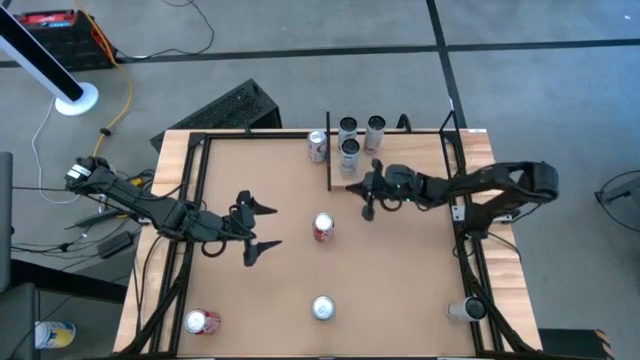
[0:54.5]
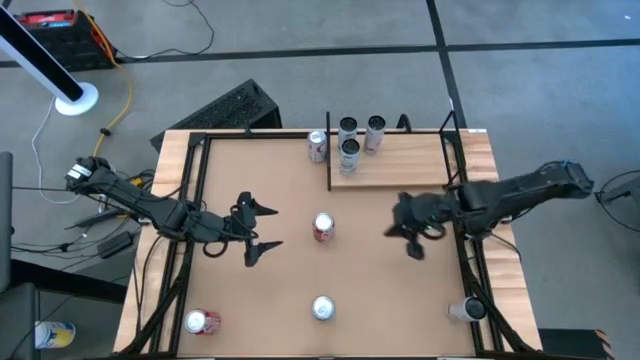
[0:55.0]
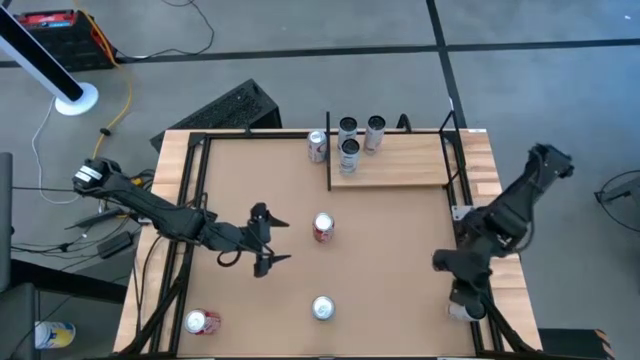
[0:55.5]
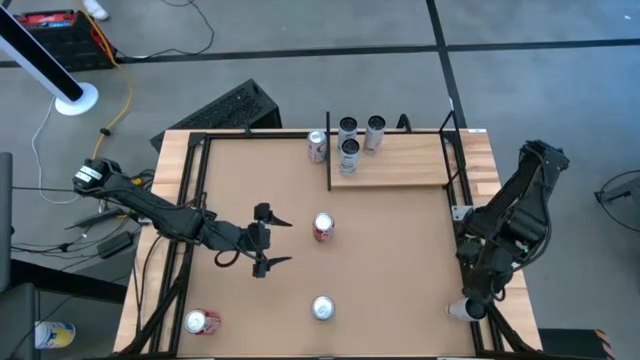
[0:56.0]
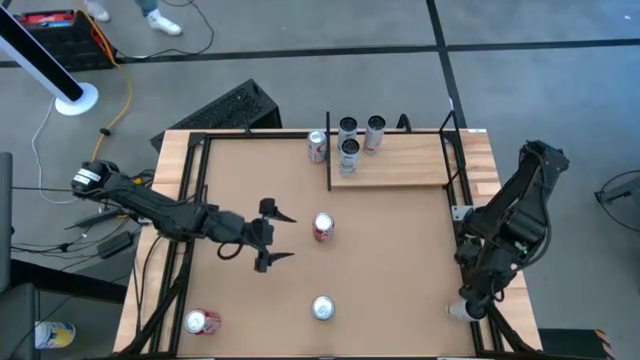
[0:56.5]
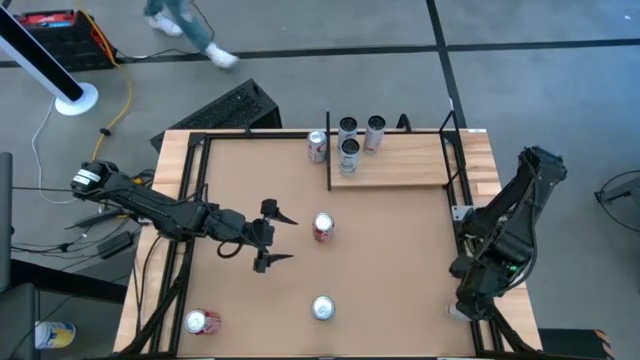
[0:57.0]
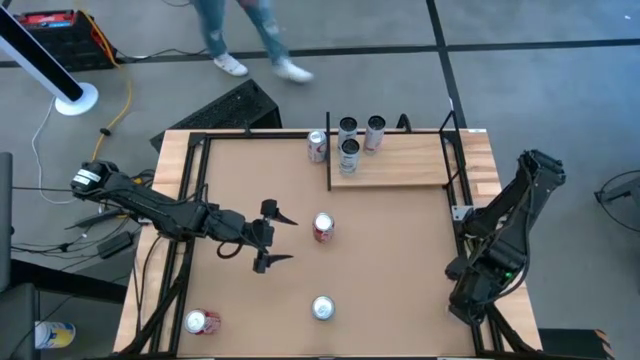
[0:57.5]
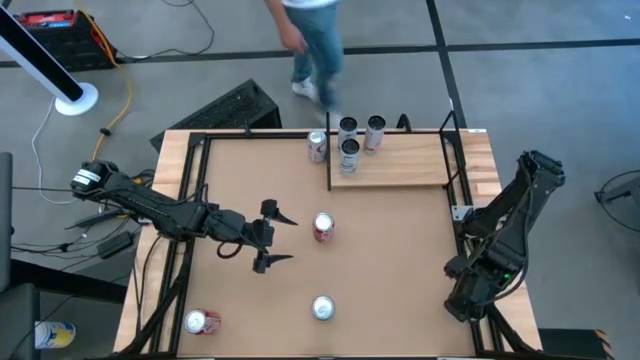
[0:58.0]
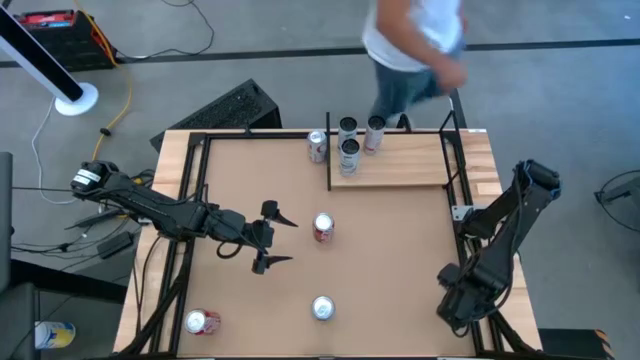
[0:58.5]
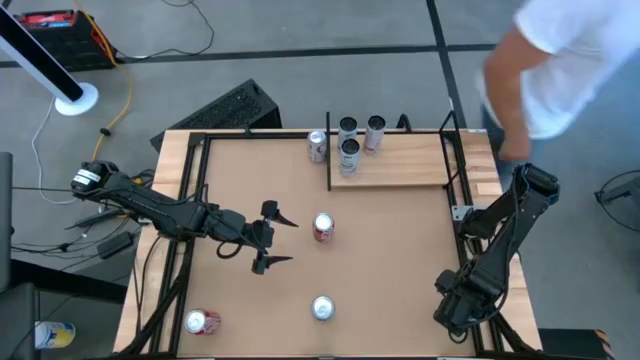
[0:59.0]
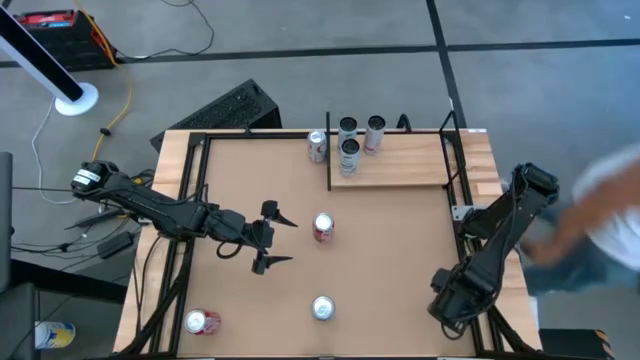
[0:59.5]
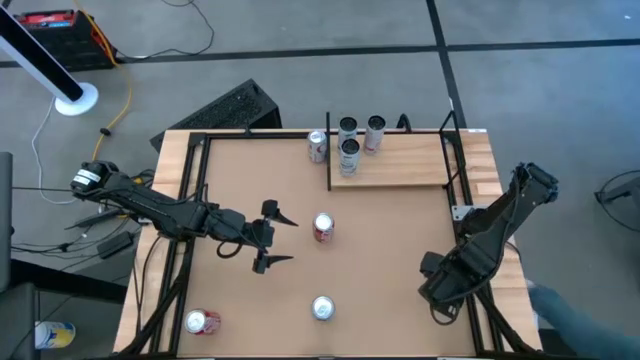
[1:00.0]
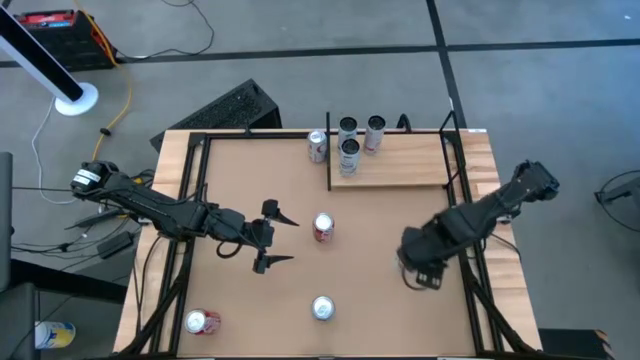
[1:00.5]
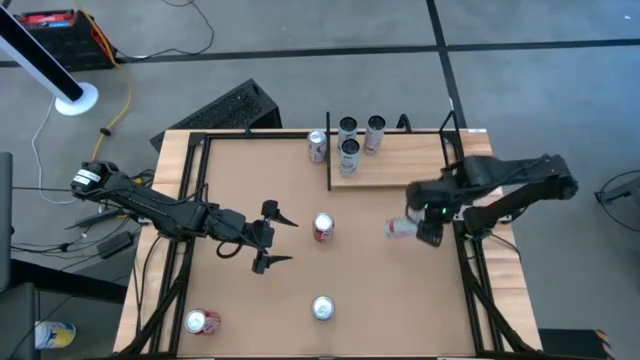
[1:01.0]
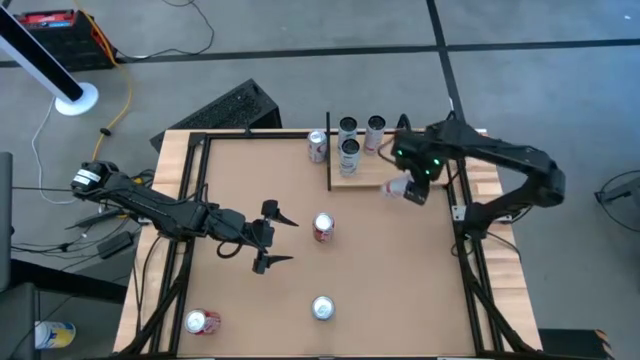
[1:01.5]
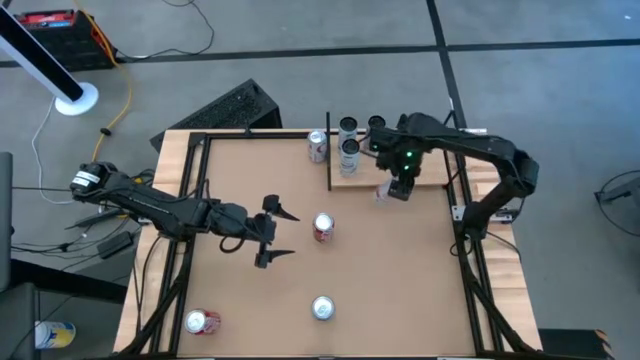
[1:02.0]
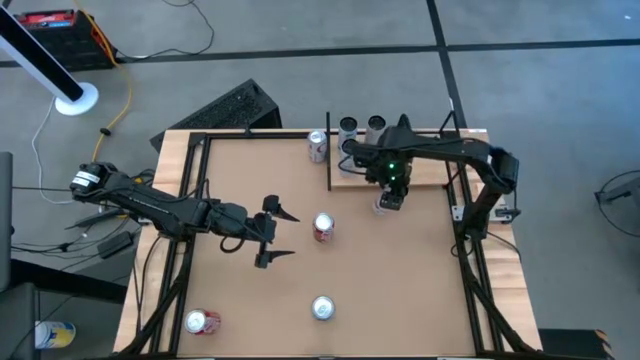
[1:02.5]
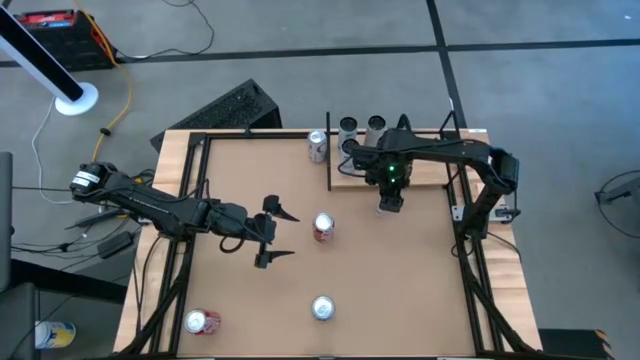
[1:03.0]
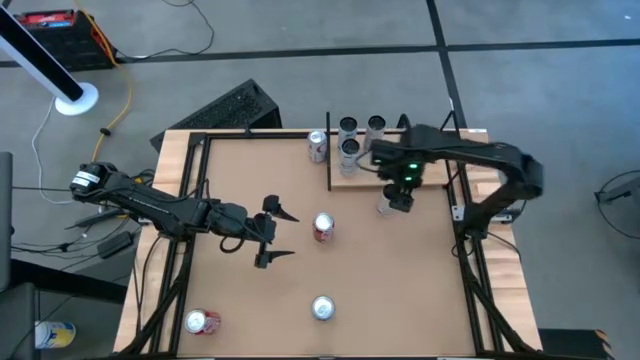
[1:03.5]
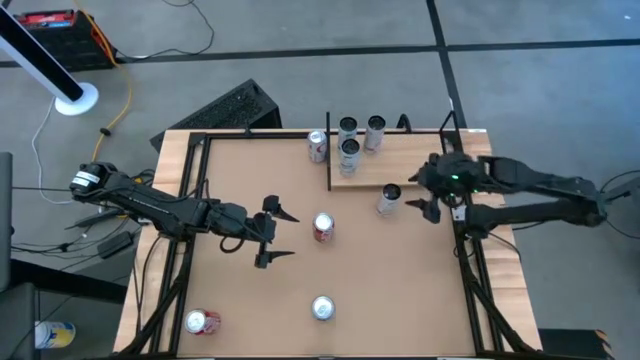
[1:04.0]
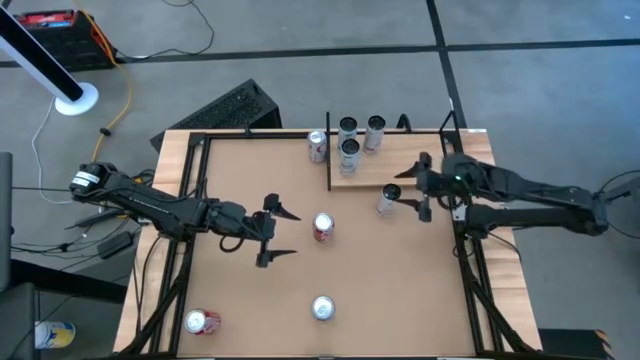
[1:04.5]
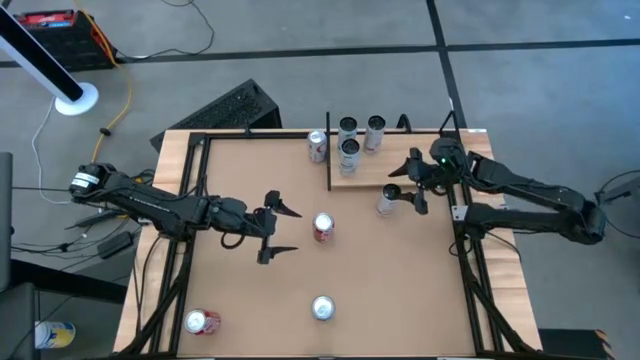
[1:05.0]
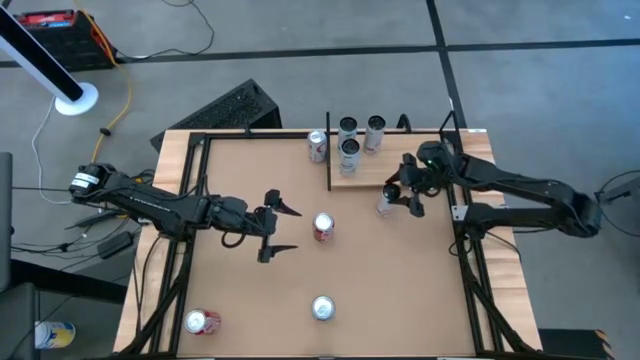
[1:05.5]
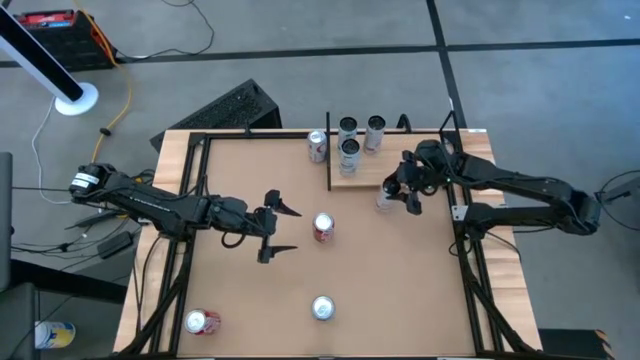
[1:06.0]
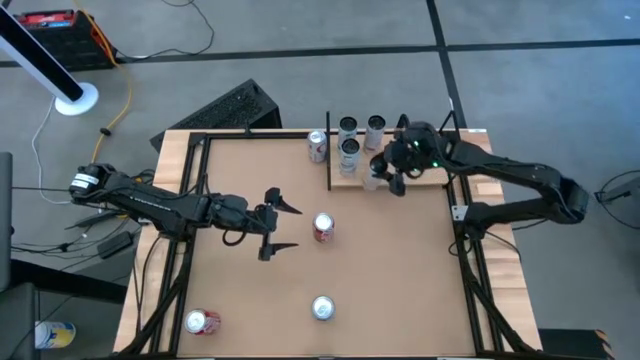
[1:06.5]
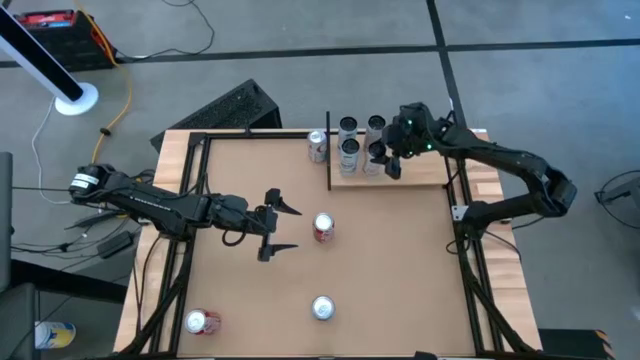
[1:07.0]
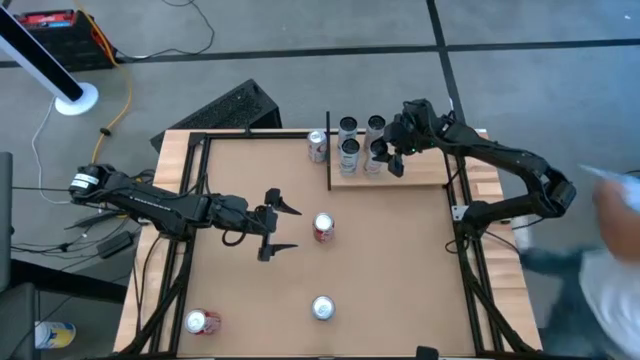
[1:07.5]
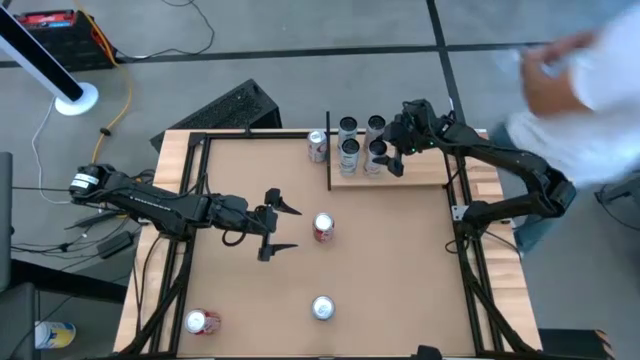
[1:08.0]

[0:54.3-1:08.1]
Task: Place canned beverage on shelf
Put the silver and pink soda can on the shelf

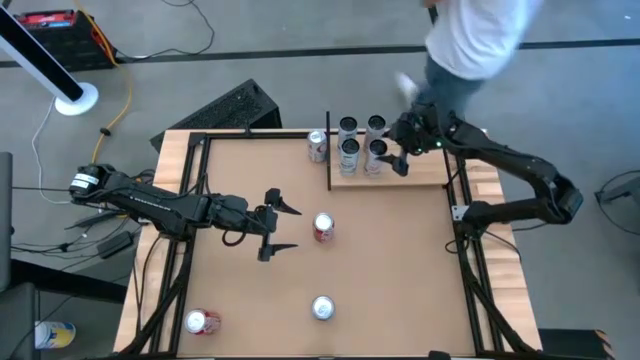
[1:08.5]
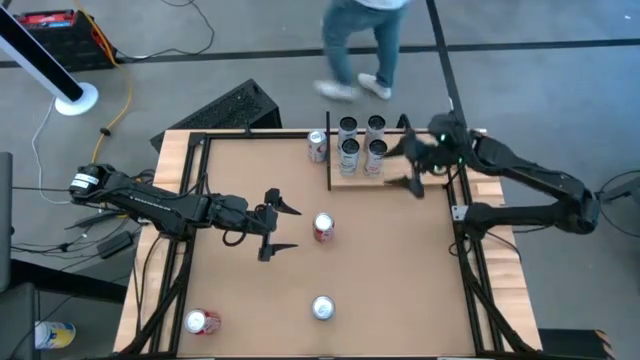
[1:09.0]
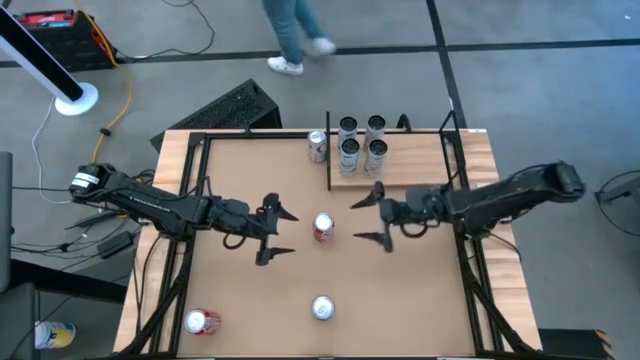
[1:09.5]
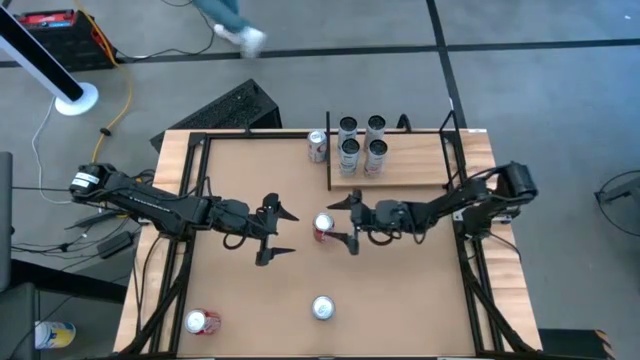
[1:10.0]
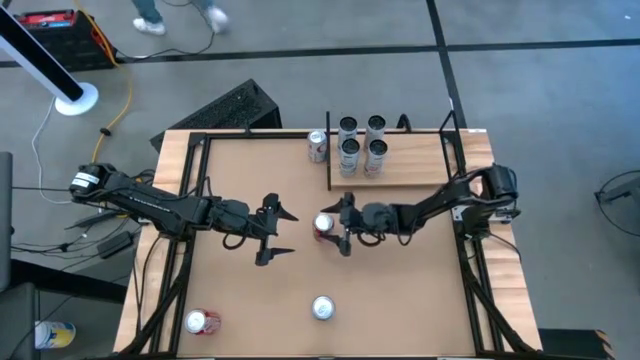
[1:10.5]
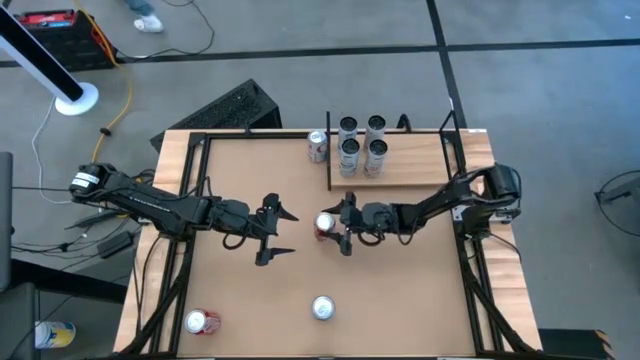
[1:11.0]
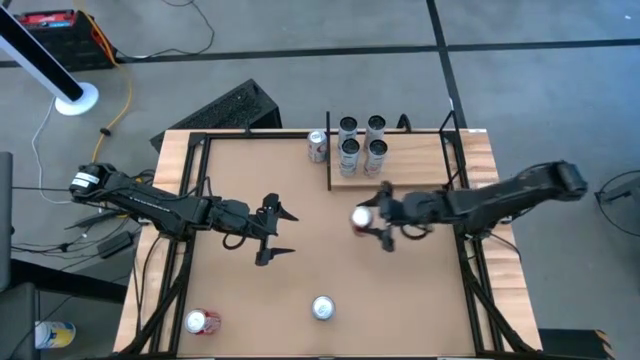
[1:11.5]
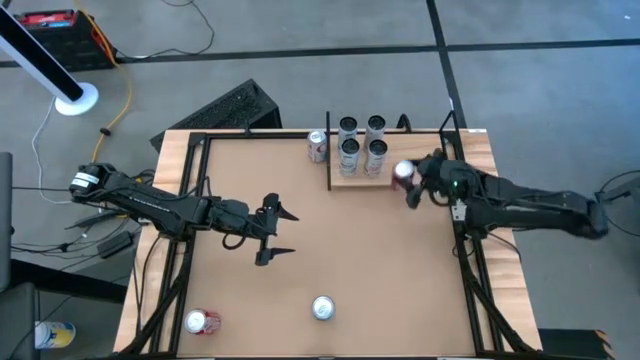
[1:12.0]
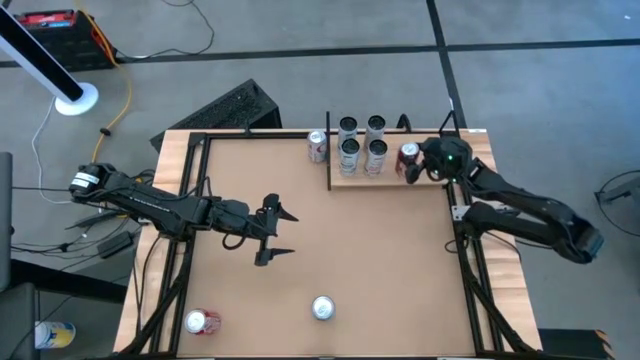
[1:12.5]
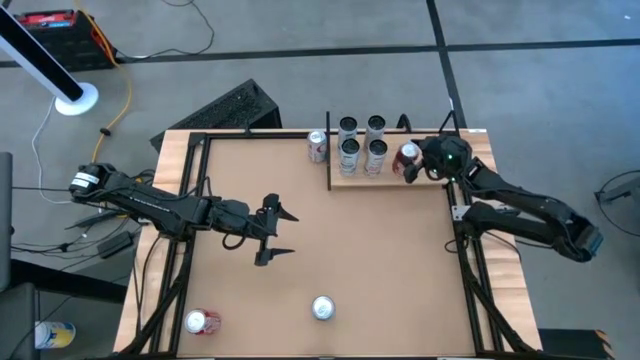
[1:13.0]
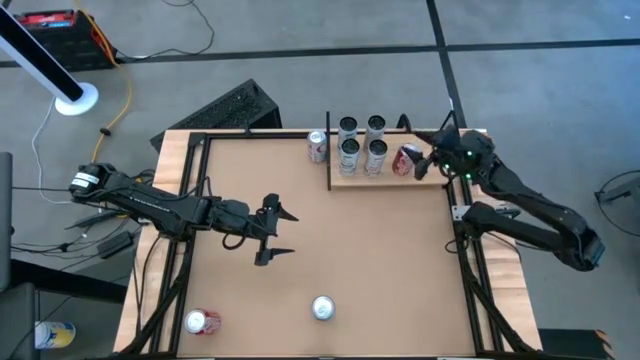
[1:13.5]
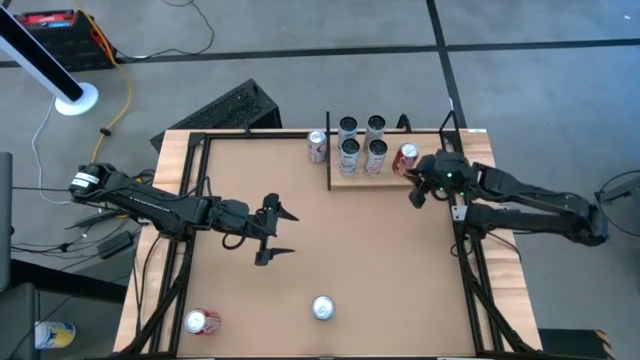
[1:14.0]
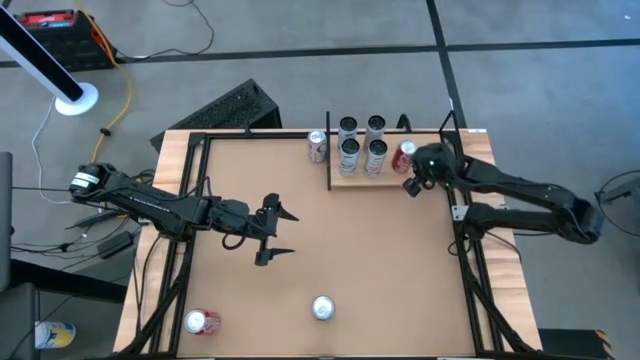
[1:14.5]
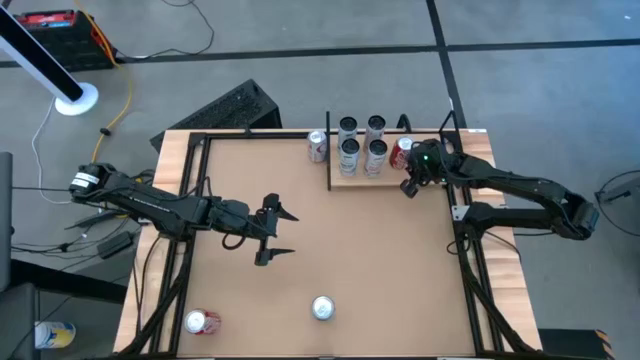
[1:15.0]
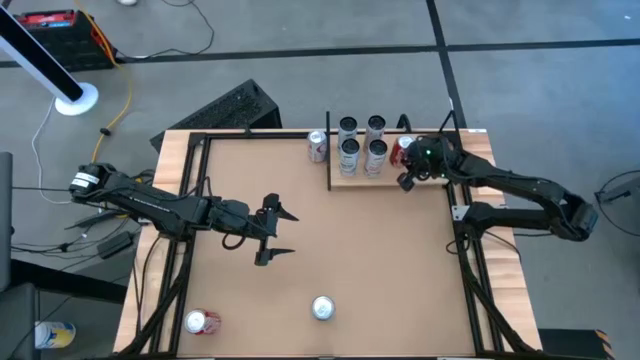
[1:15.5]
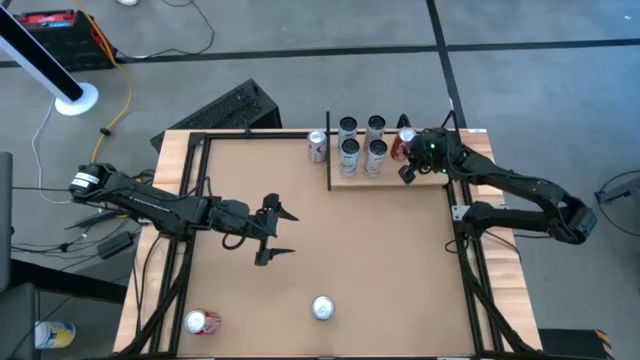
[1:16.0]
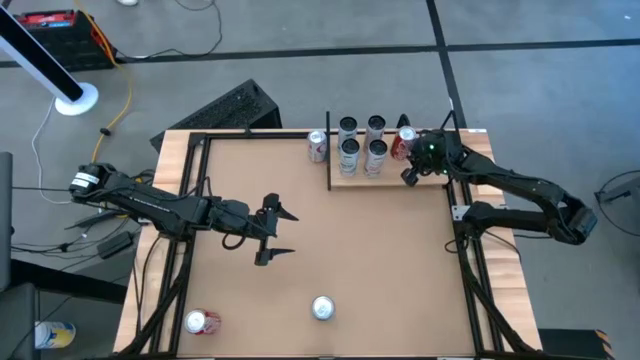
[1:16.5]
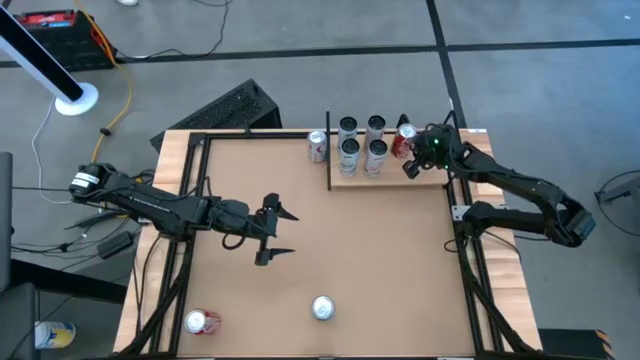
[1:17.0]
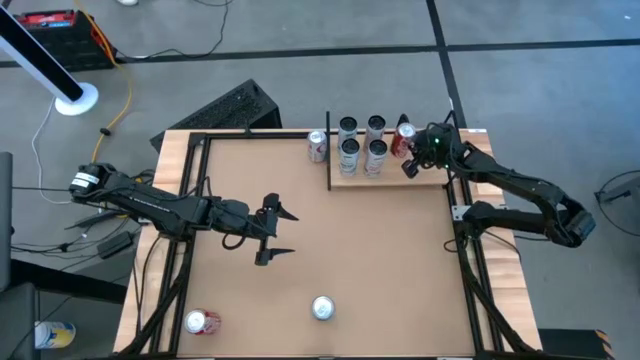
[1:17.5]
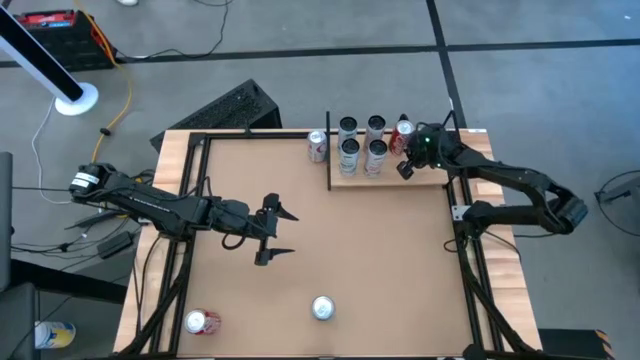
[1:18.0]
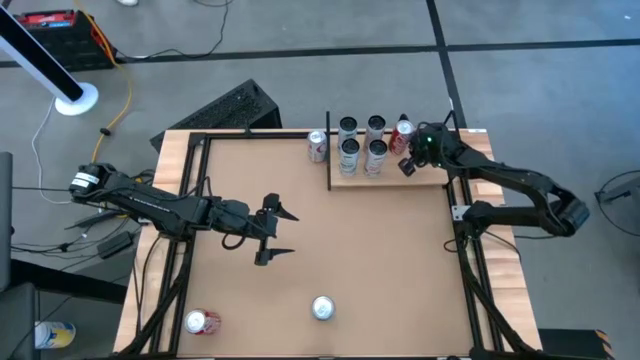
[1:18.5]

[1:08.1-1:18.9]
Put the top red soda can on the shelf
